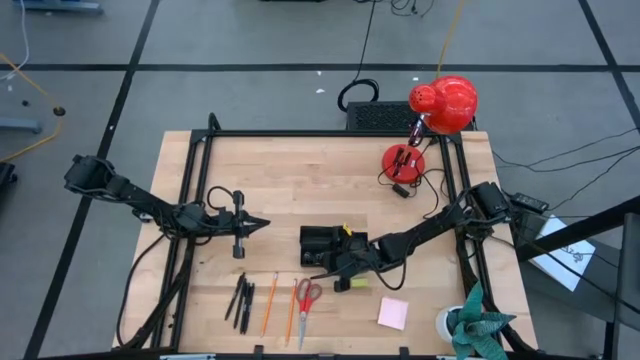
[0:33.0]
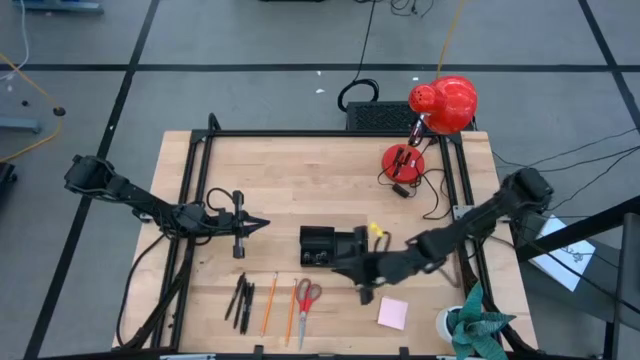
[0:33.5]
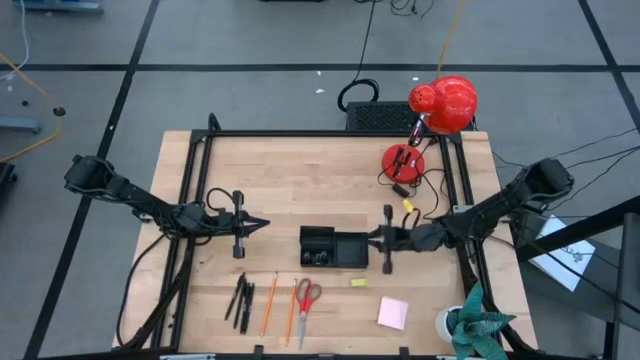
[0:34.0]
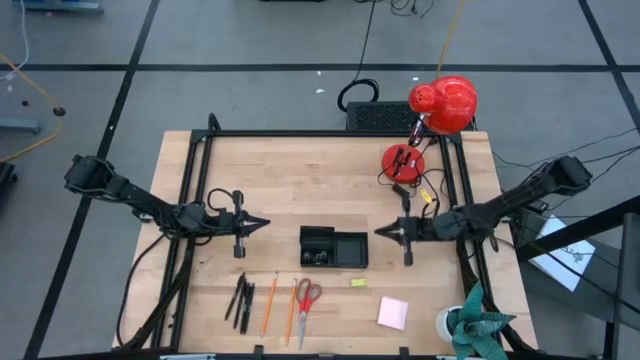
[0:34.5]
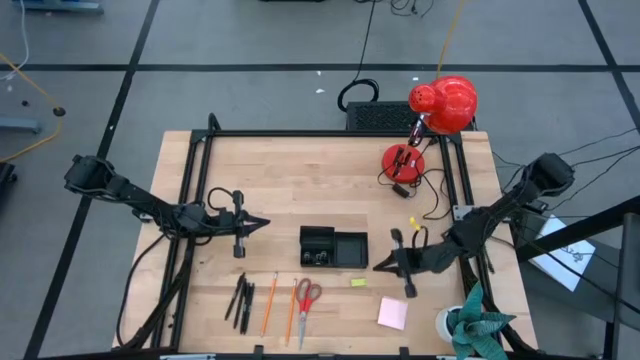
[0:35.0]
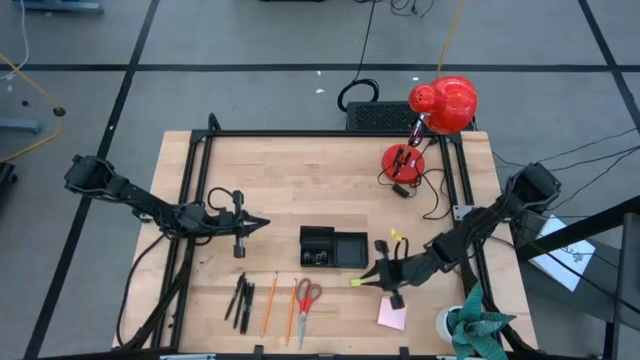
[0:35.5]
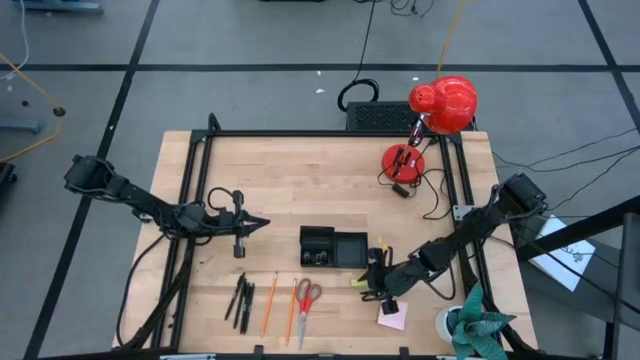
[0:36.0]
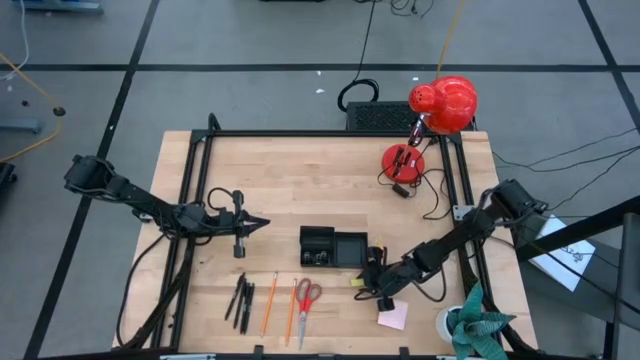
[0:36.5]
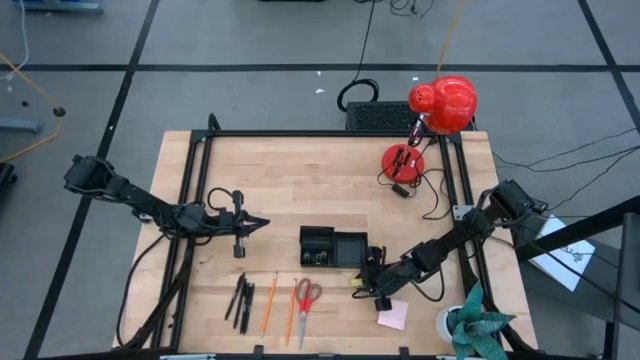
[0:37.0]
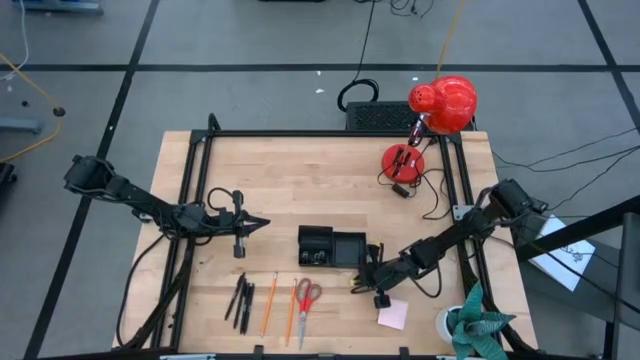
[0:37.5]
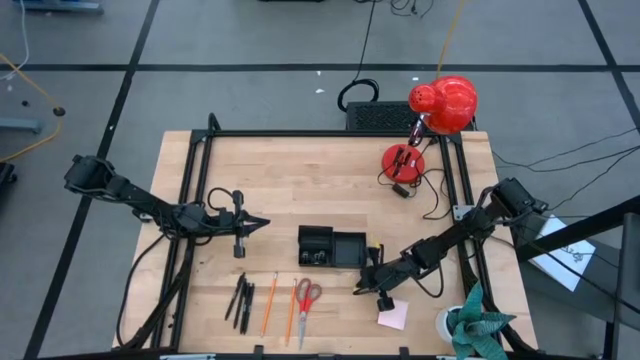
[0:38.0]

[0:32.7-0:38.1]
Task: Pick and place office supplies into organizer
Put the yellow eraser into the black desk organizer

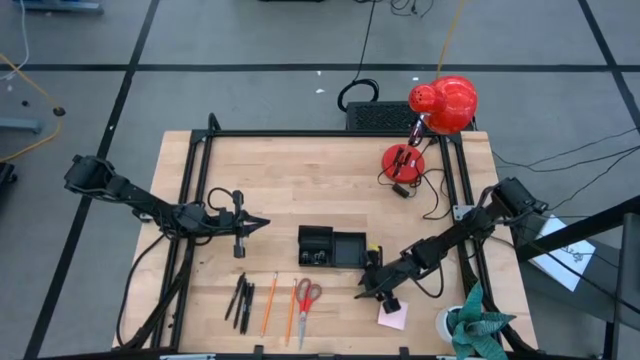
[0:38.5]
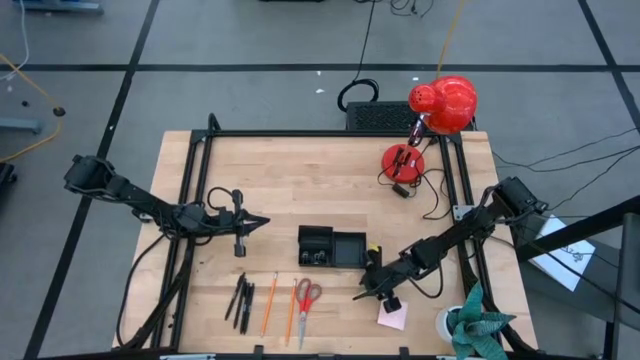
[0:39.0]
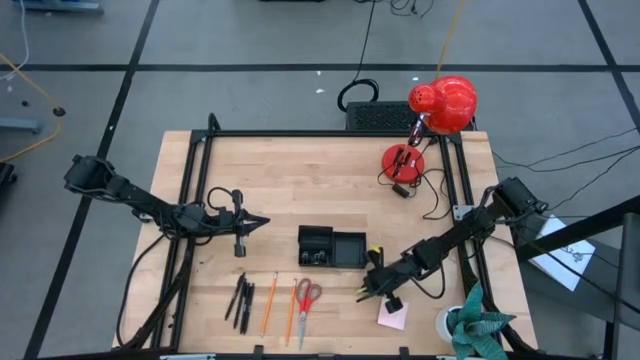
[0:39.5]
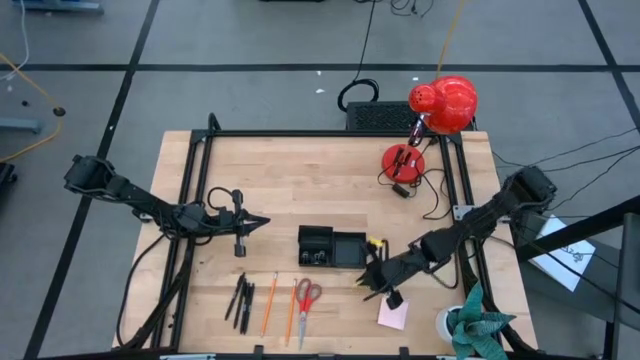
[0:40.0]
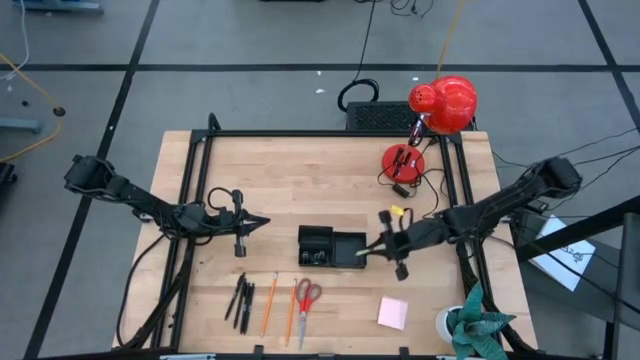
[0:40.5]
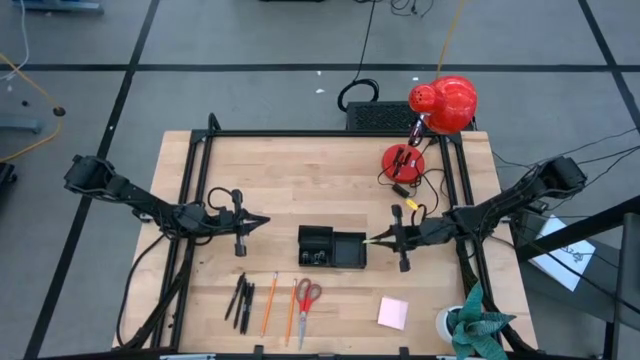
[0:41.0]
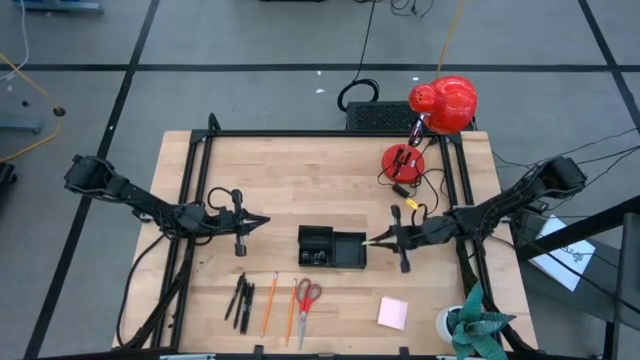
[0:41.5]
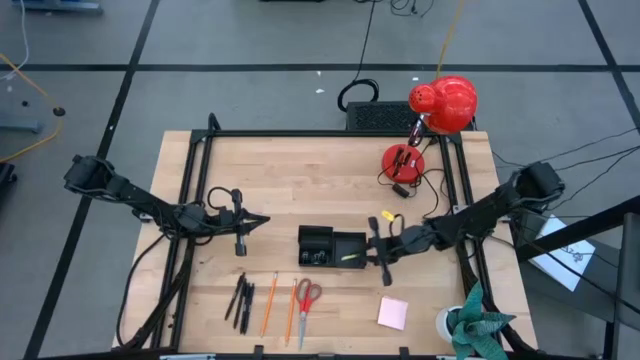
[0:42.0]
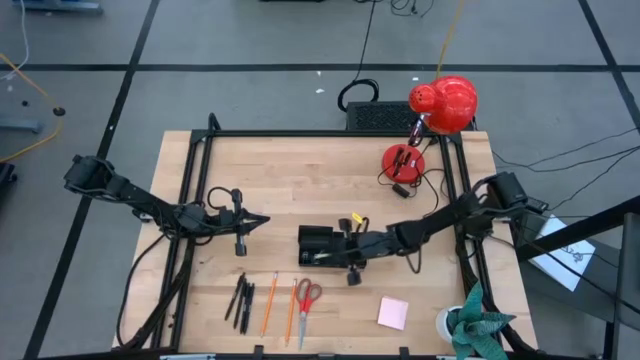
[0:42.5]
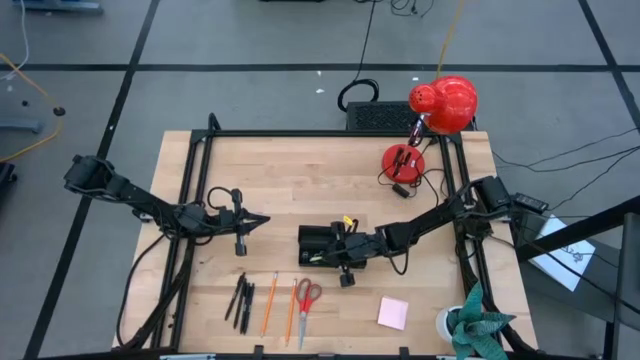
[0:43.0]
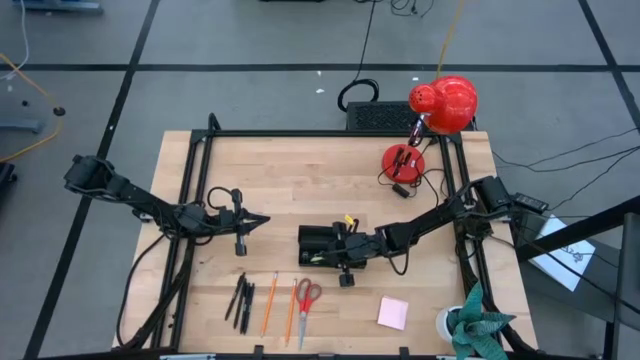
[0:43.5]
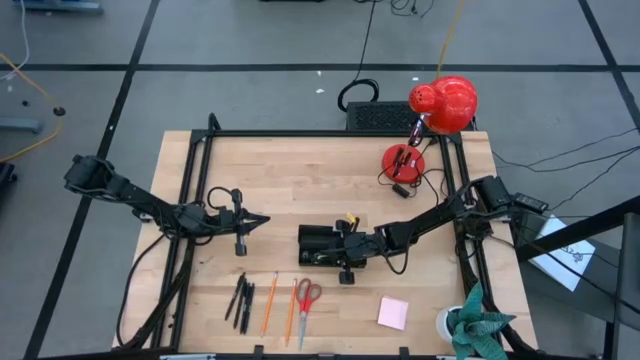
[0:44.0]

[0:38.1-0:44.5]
Put the yellow eraser into the black desk organizer

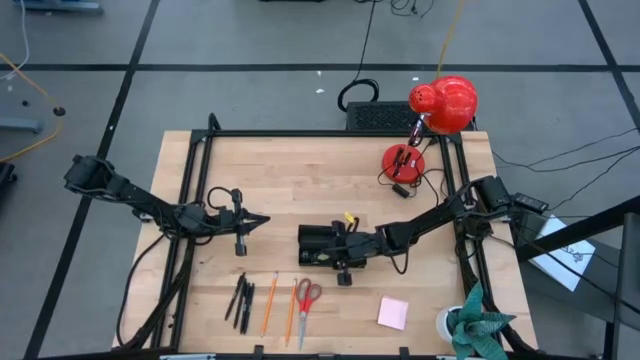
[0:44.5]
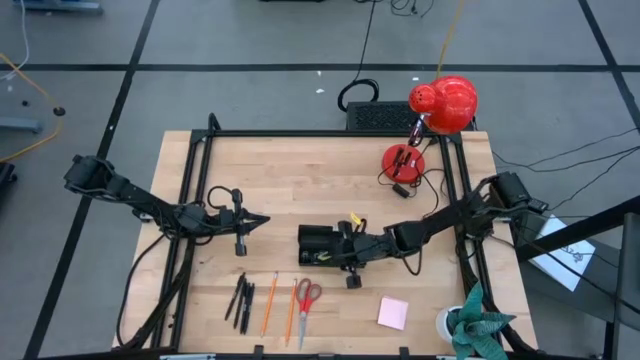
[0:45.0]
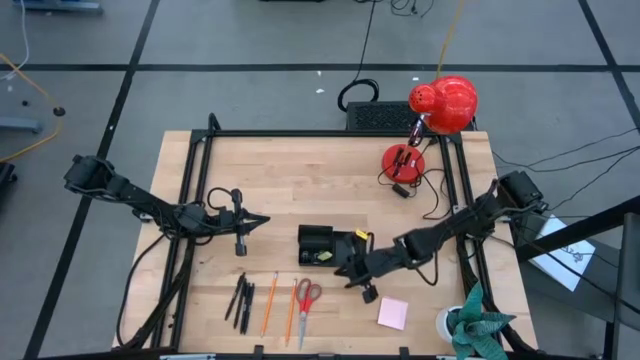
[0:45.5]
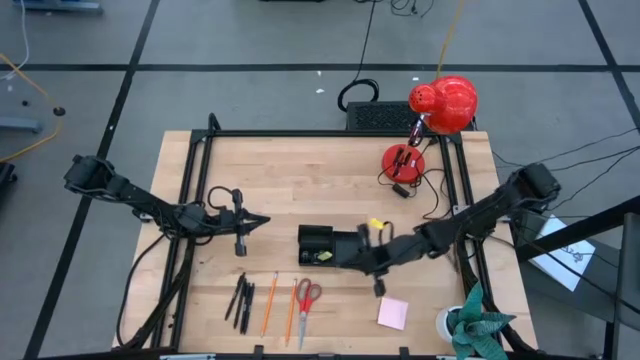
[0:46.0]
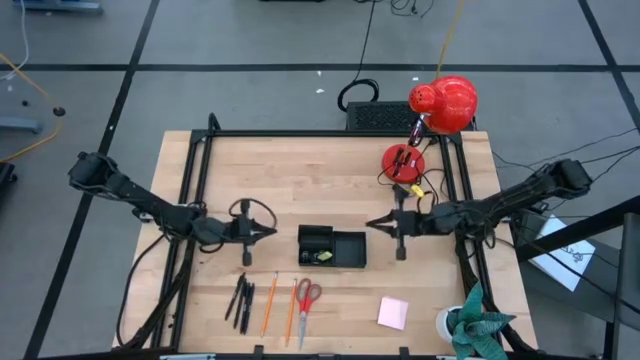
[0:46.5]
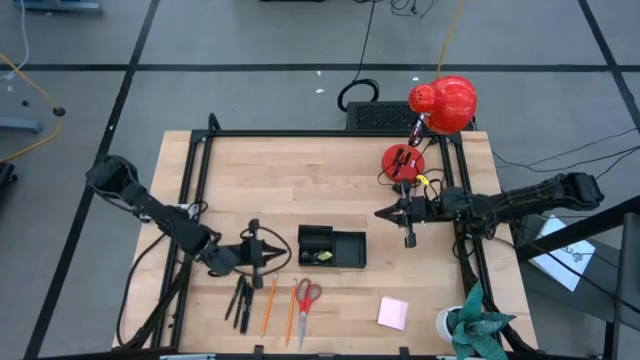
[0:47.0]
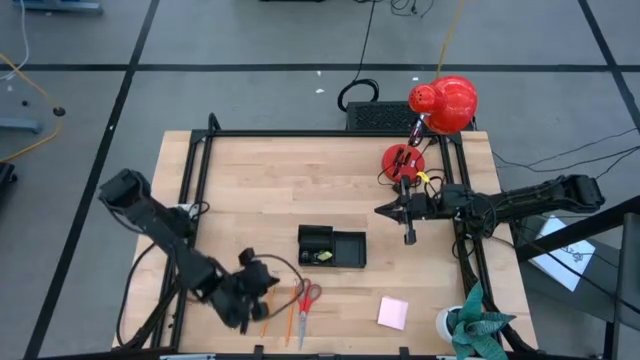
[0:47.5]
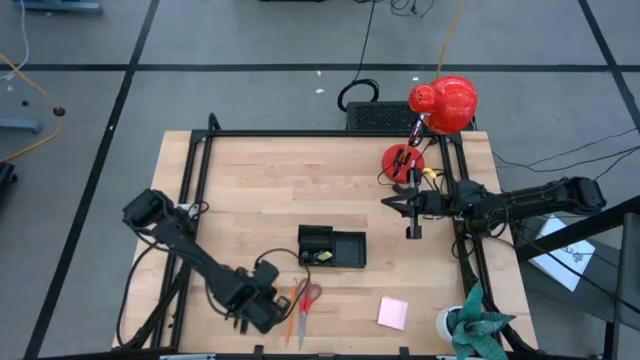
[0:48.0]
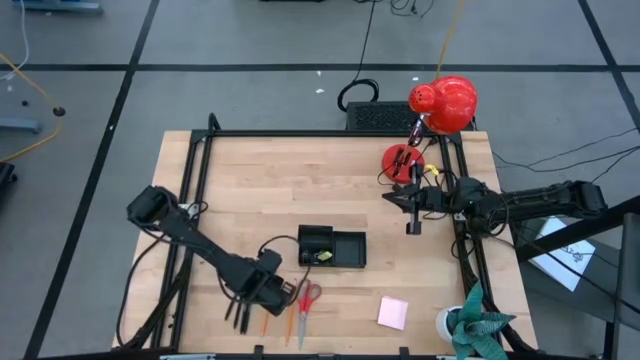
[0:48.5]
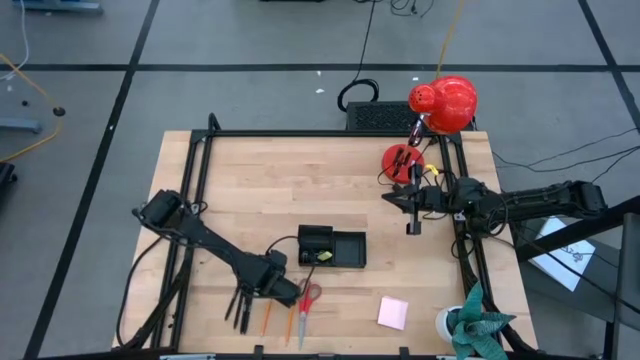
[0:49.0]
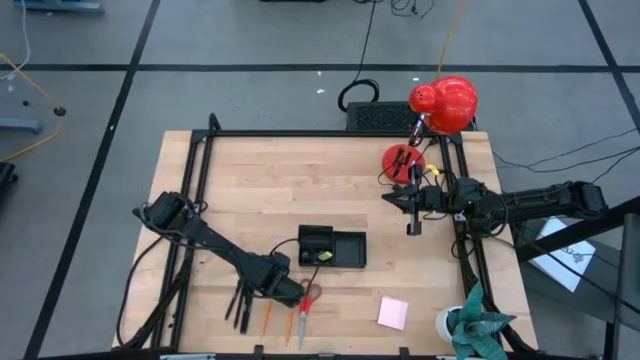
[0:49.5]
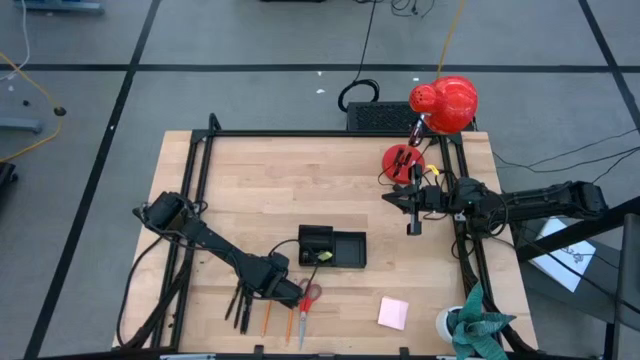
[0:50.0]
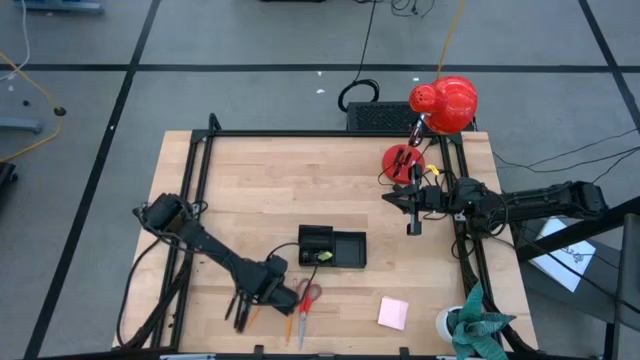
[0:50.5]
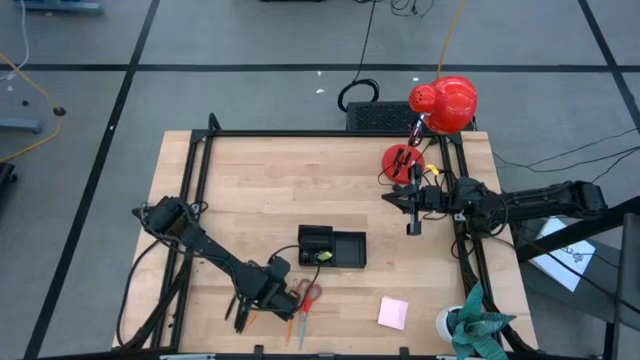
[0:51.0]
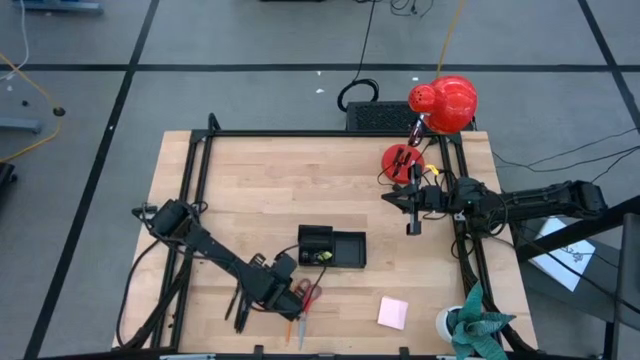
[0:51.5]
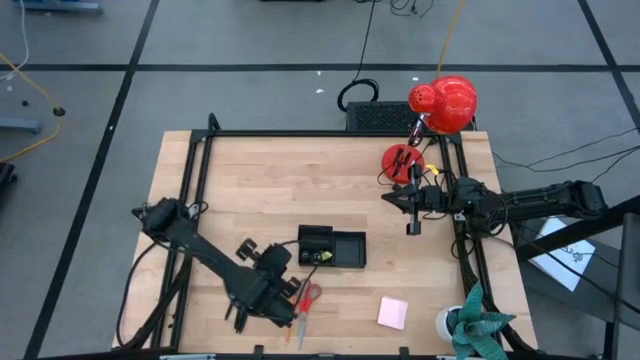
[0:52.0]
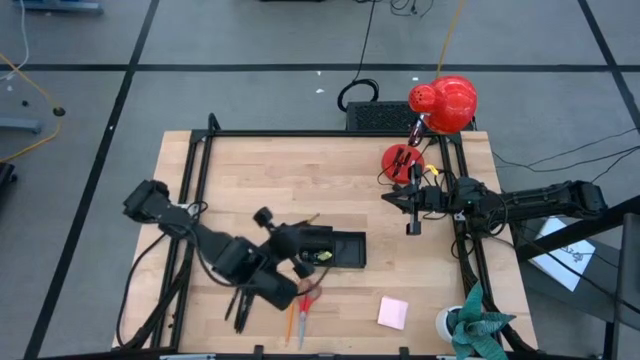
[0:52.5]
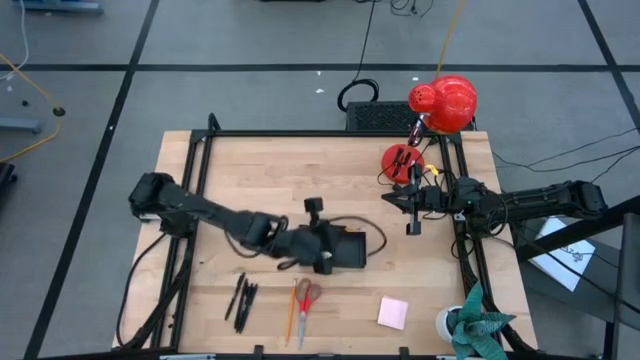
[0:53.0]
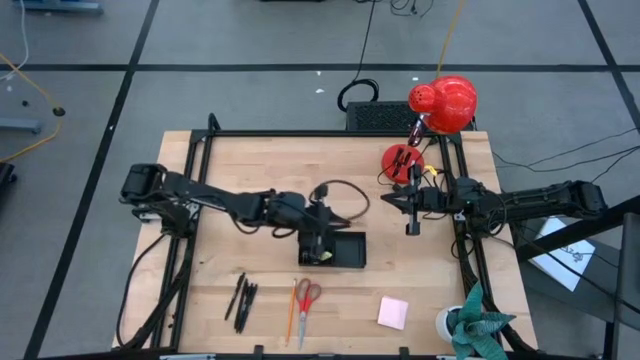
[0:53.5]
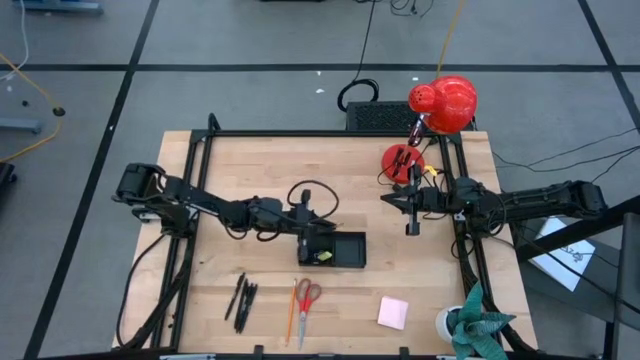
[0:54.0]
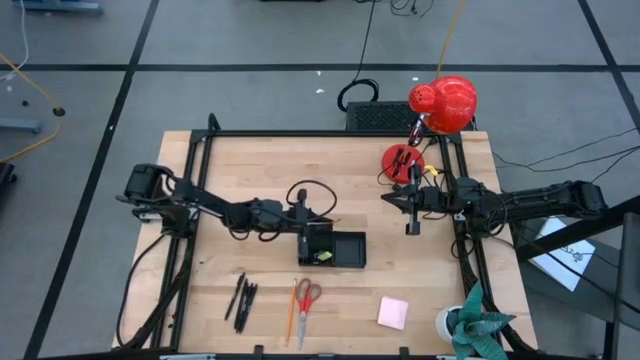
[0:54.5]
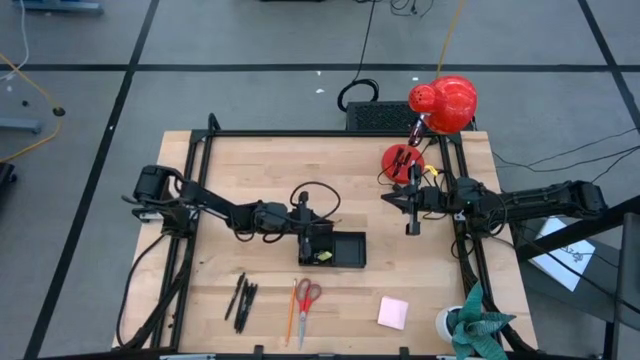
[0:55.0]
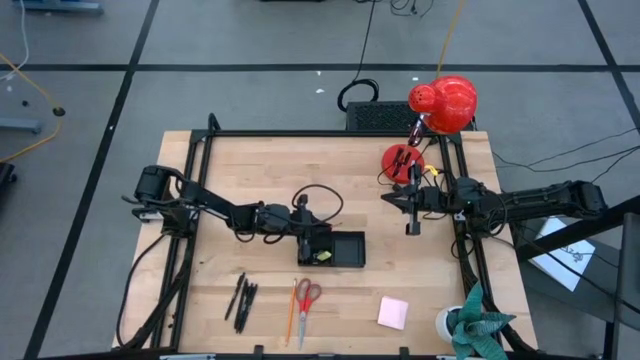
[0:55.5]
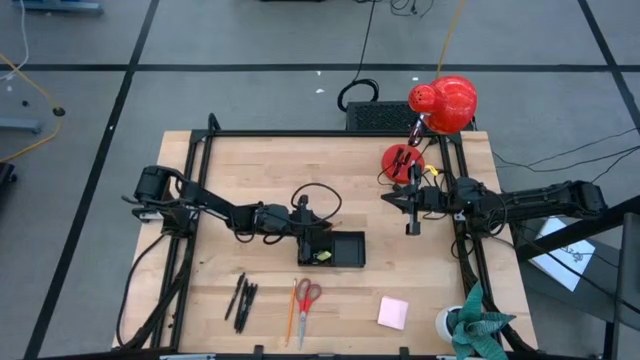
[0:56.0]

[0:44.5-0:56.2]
Put the orange pencil into the black desk organizer
